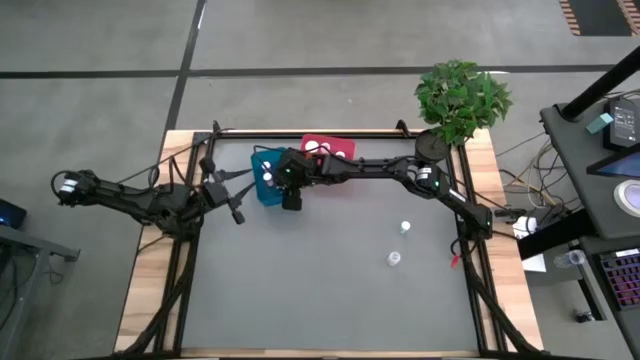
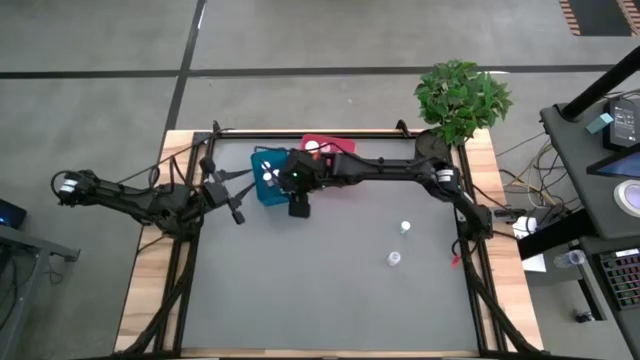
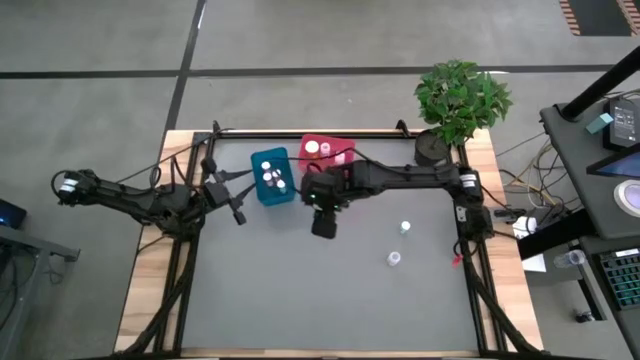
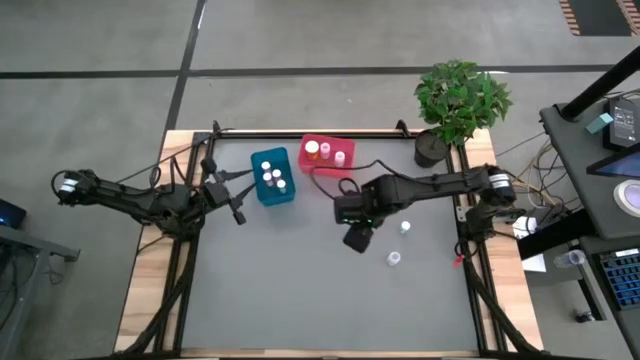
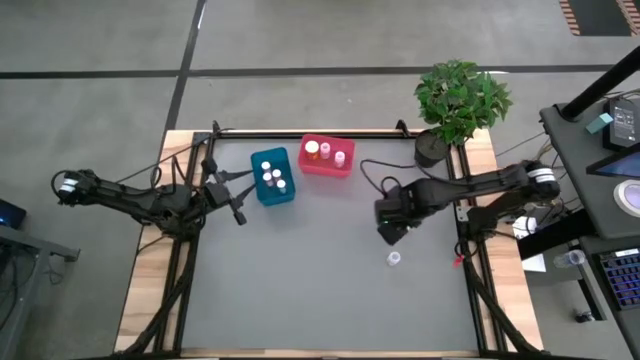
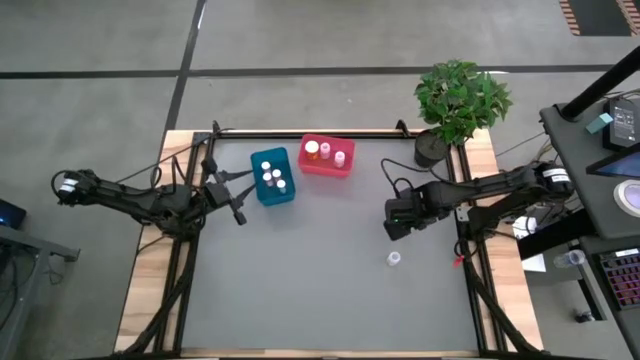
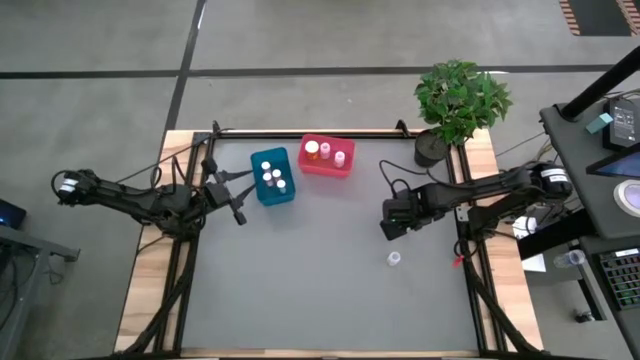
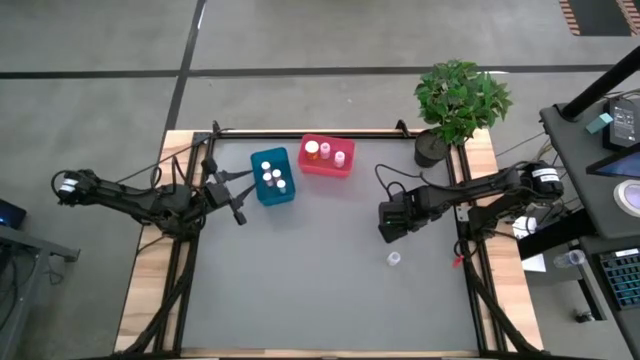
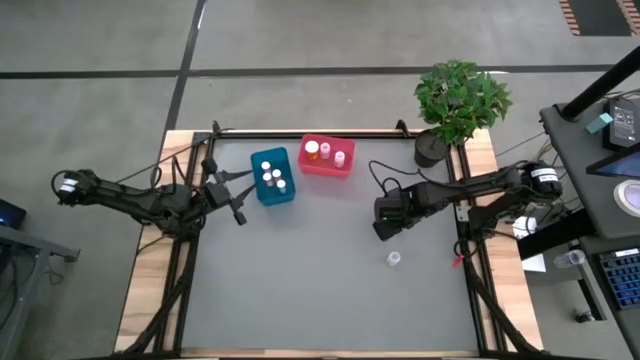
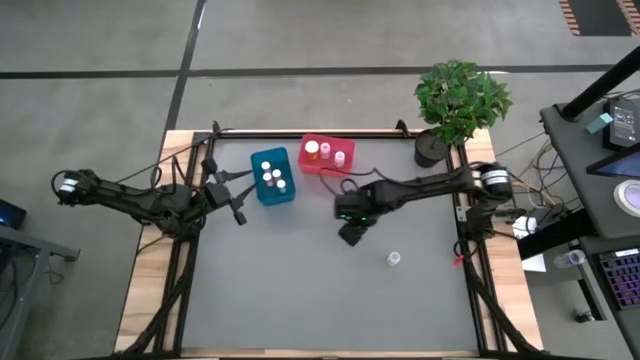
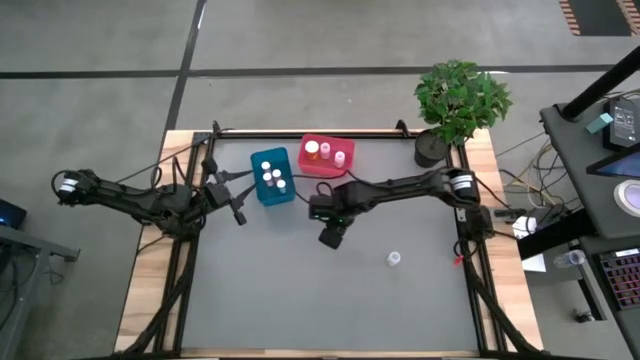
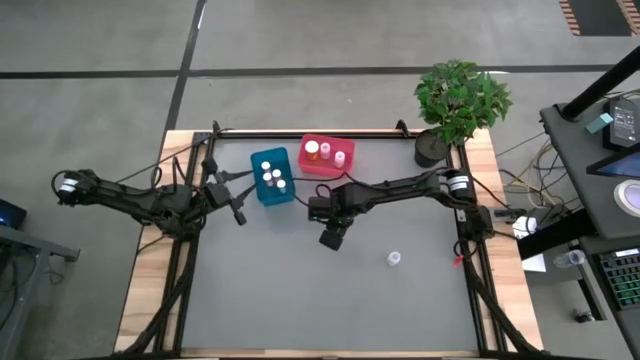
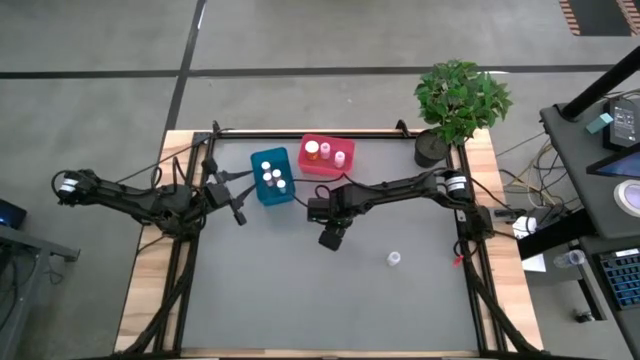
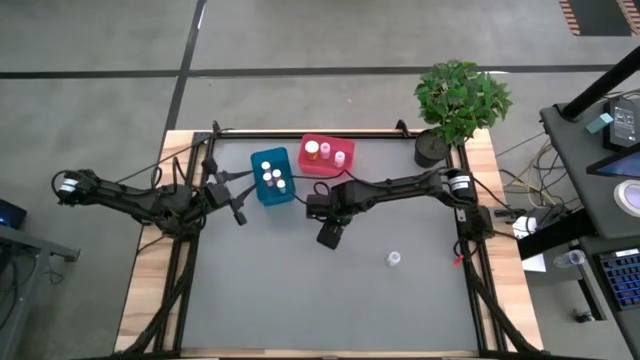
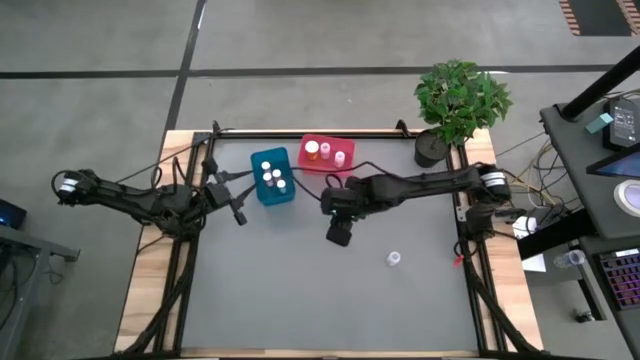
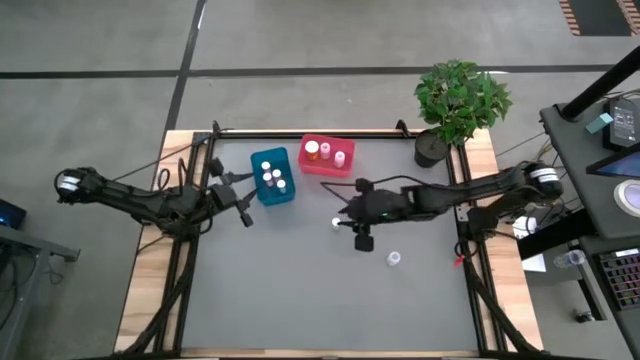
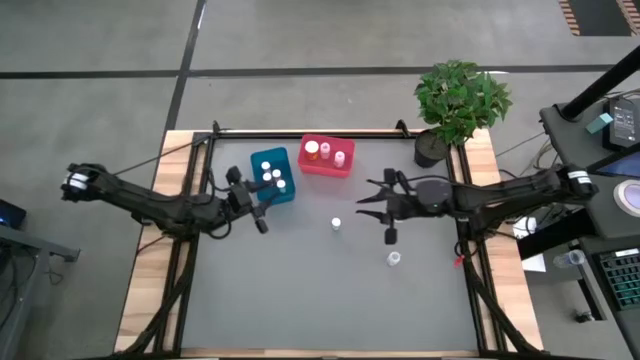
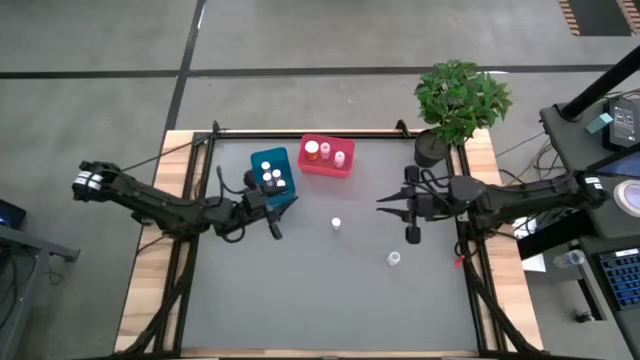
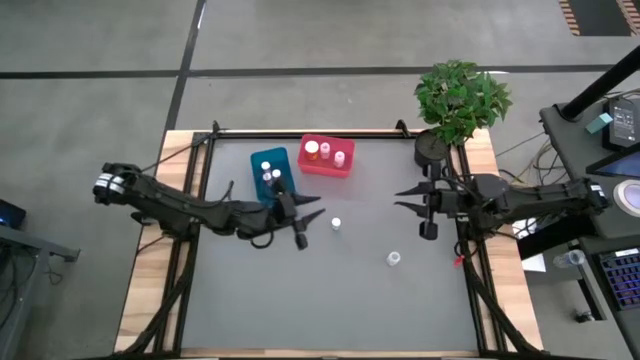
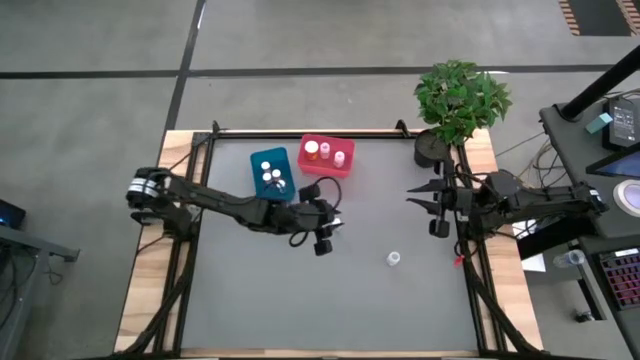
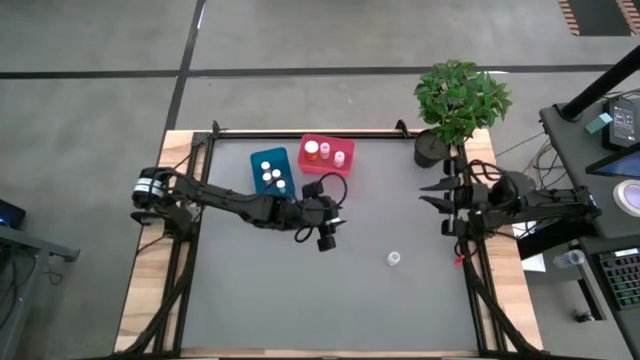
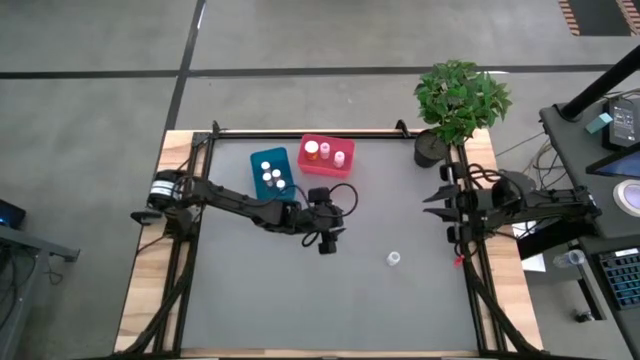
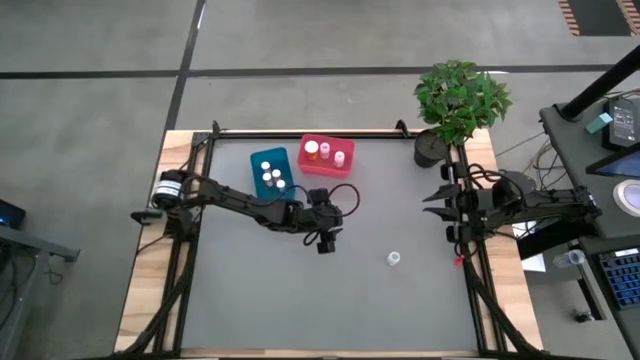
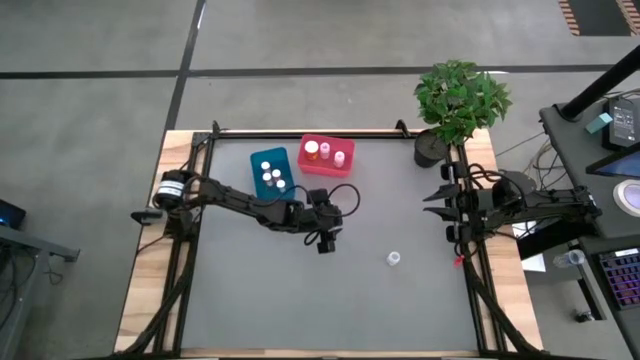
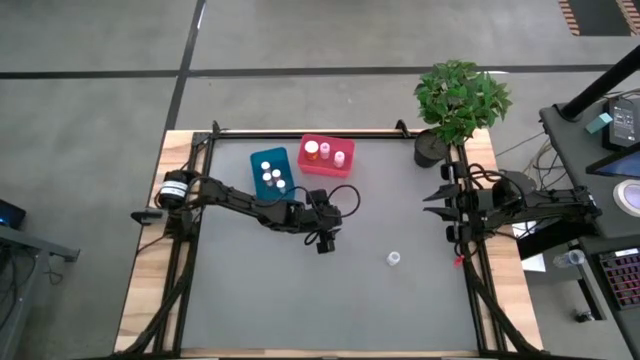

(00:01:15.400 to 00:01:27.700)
Task: Pick and place medicine bottles into bin by pill shape (circle, oval)
Put the blue tablet bottle into the blue bin

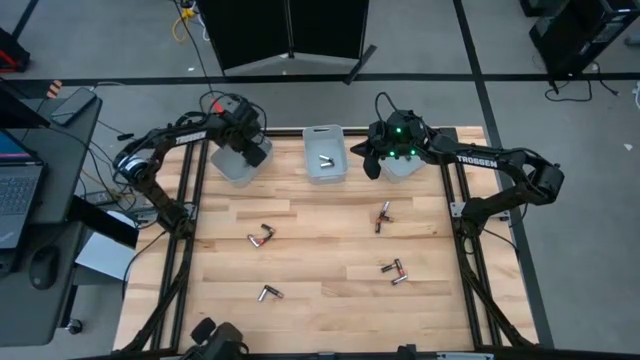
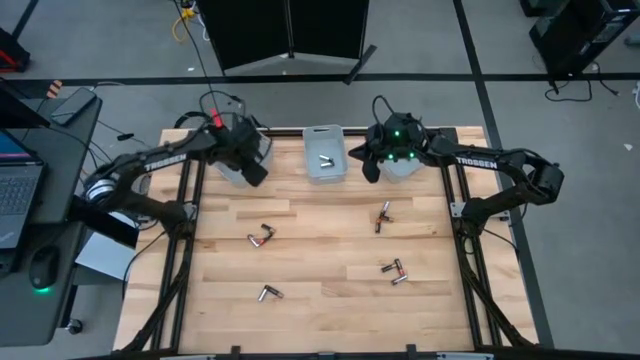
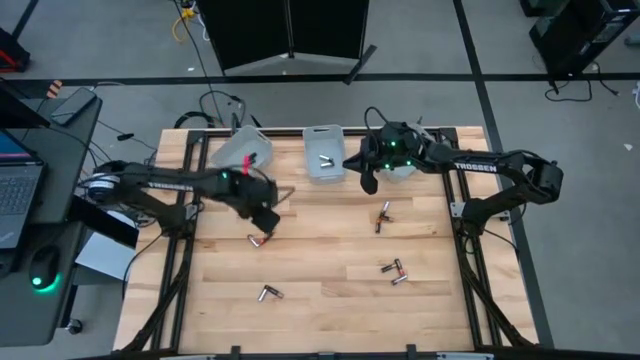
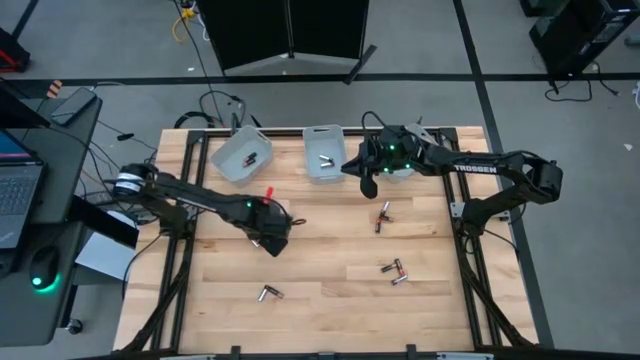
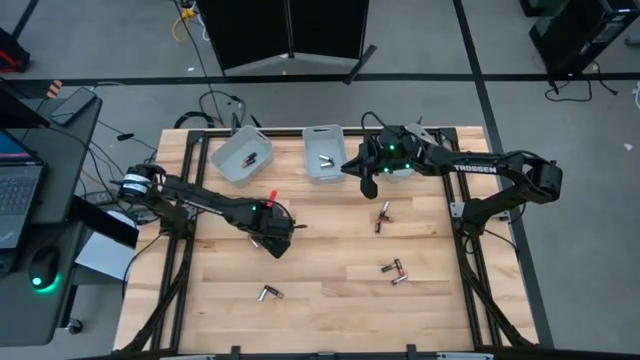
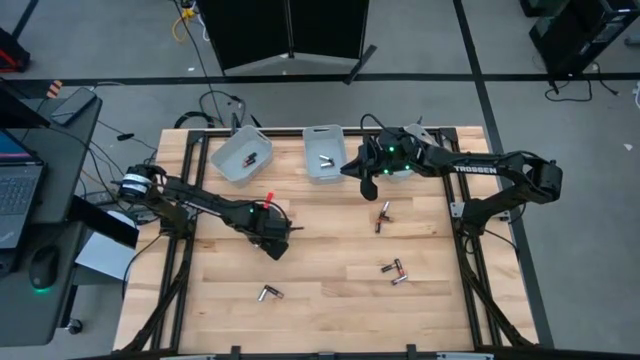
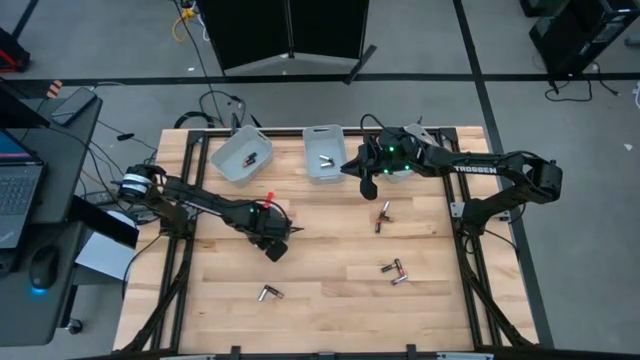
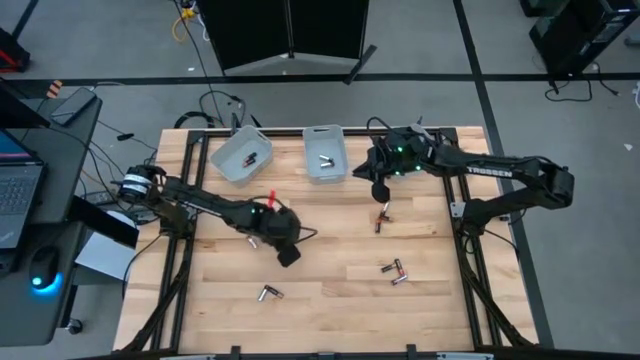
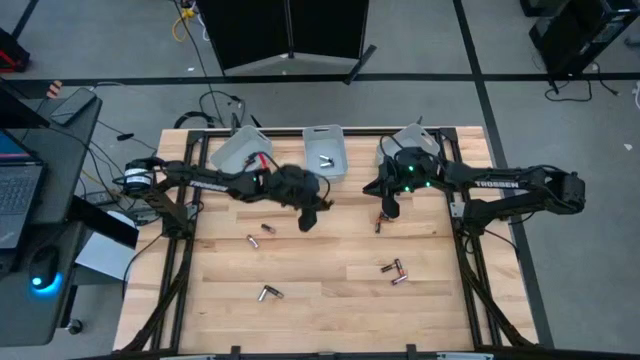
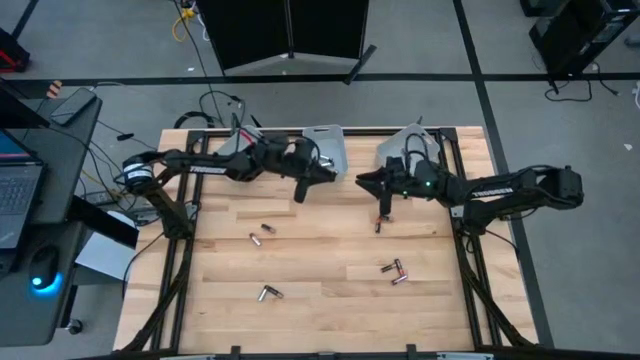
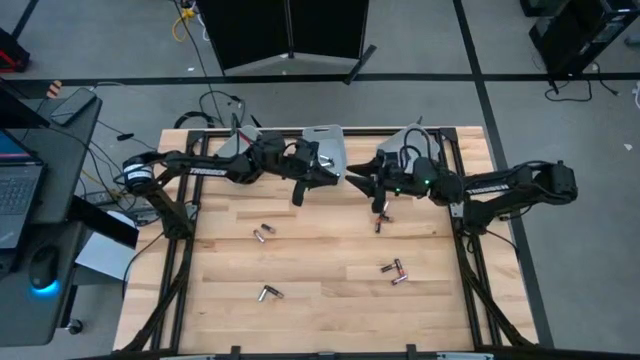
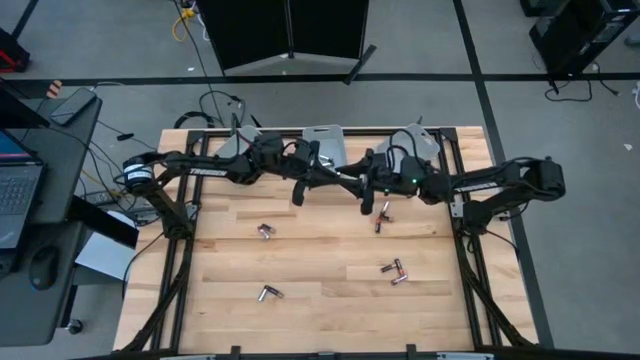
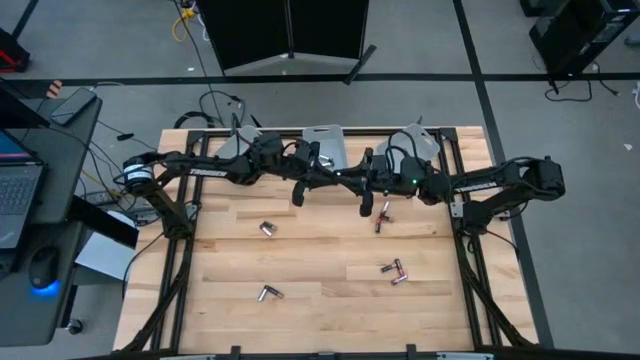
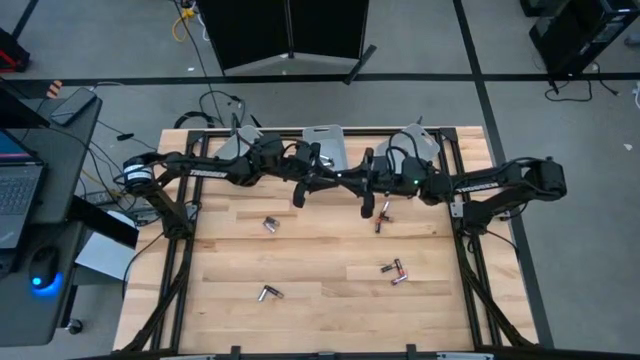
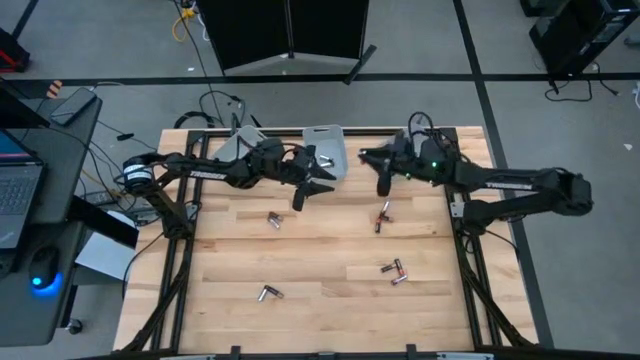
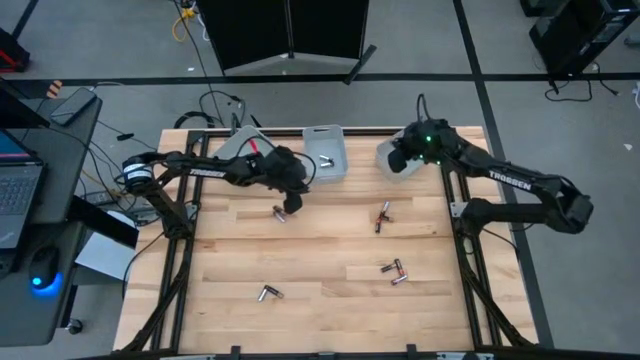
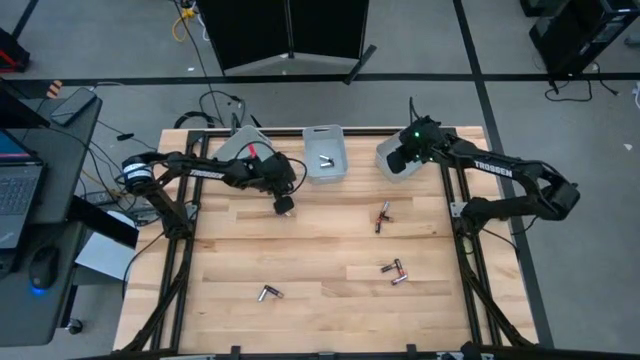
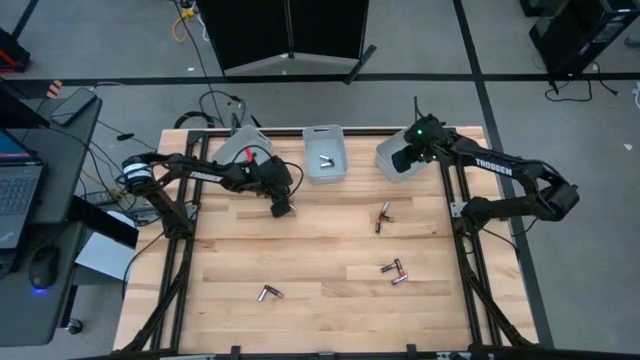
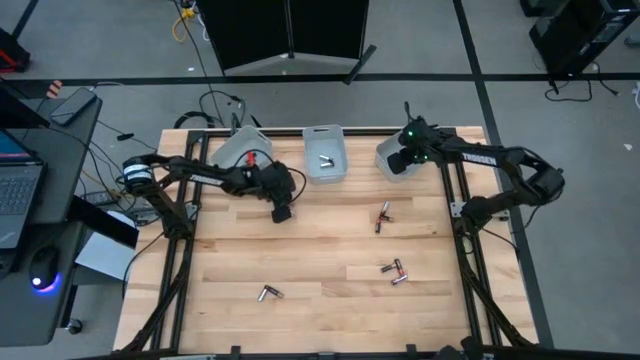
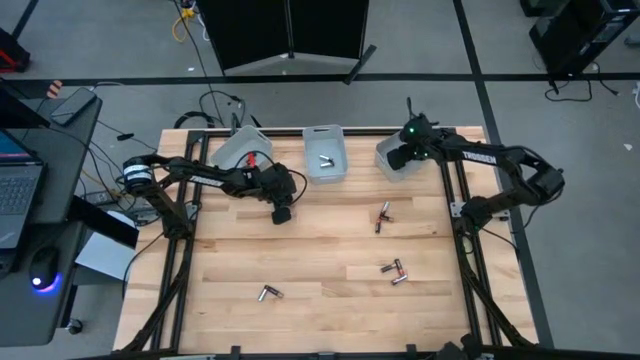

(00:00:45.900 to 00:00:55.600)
Task: Sort batteries
Put the red battery into the right gray bin
